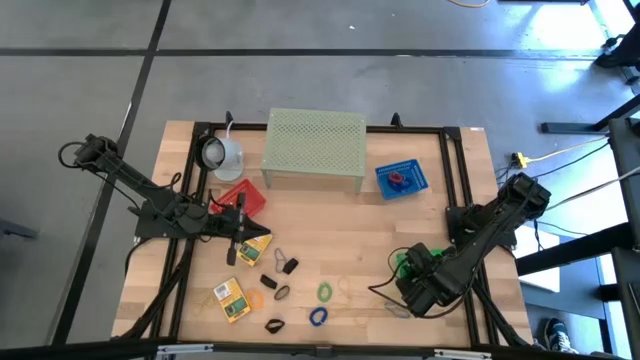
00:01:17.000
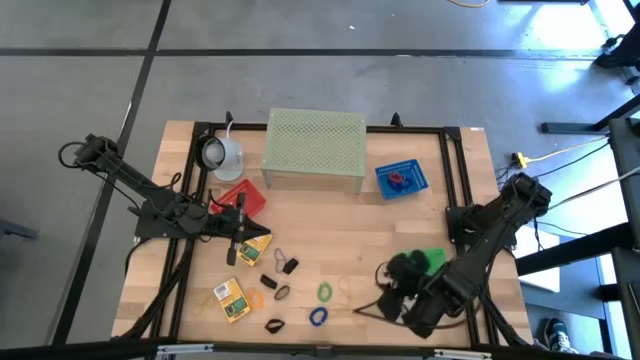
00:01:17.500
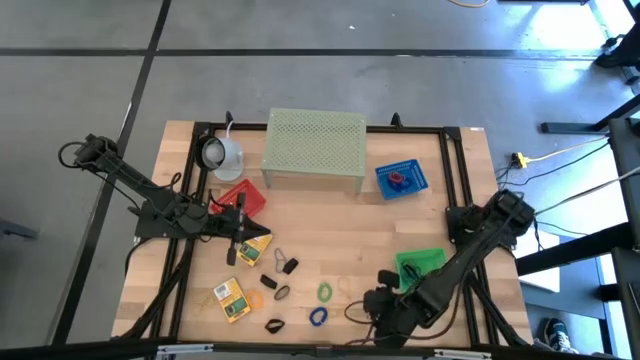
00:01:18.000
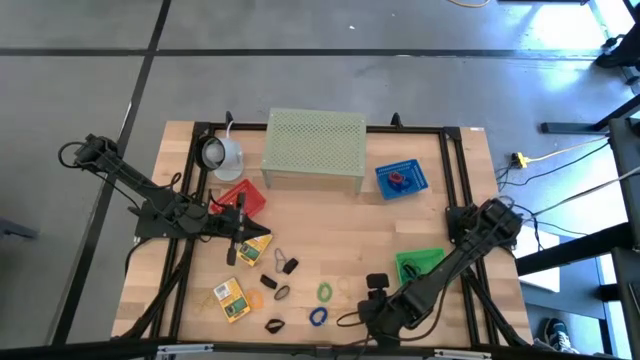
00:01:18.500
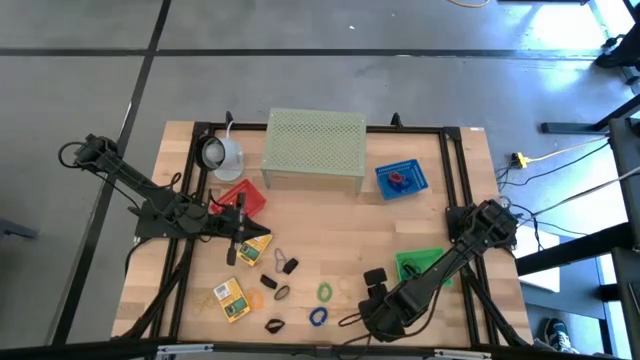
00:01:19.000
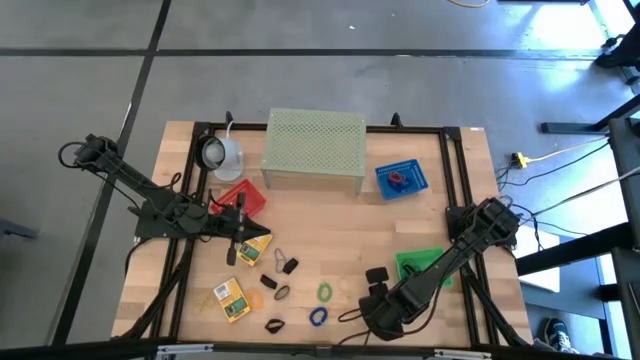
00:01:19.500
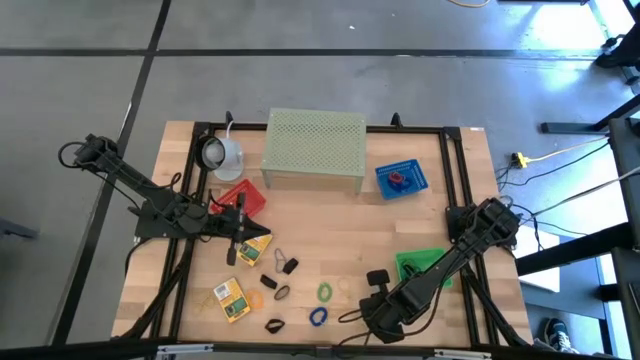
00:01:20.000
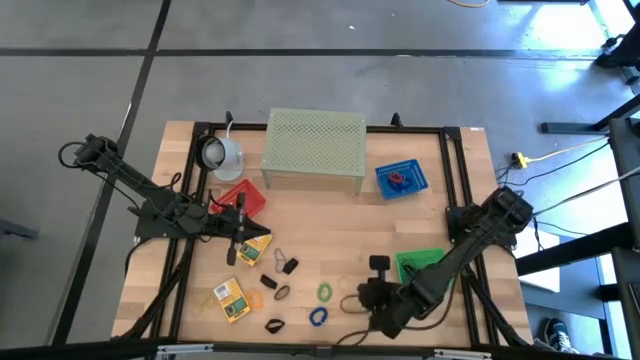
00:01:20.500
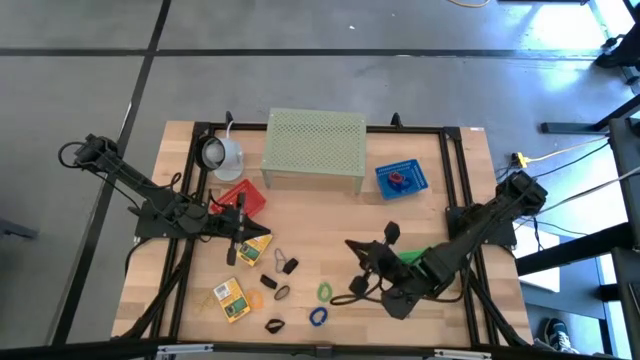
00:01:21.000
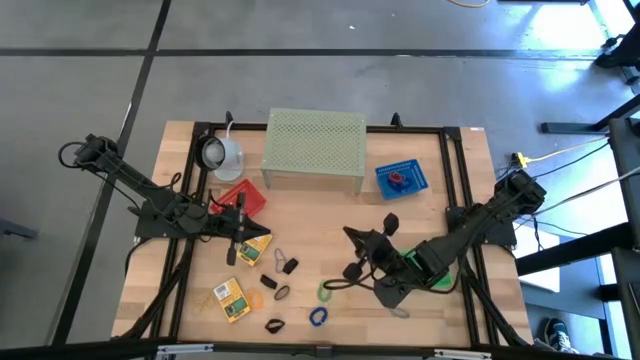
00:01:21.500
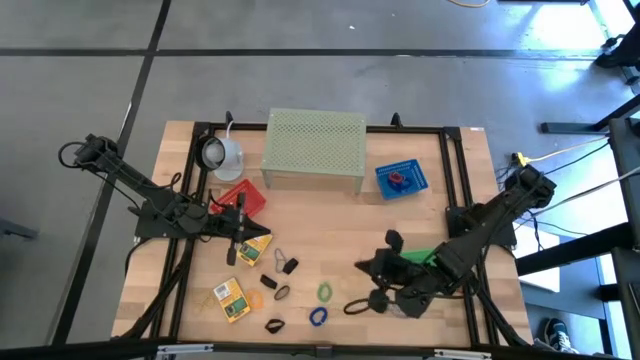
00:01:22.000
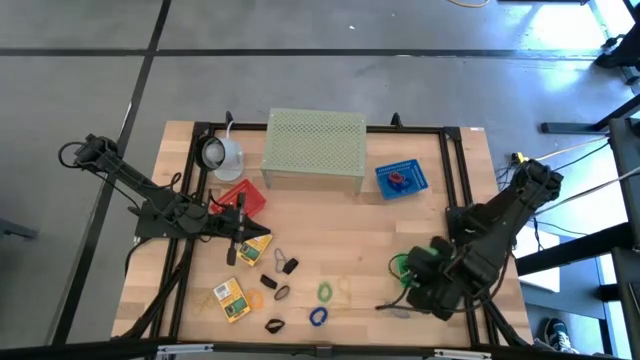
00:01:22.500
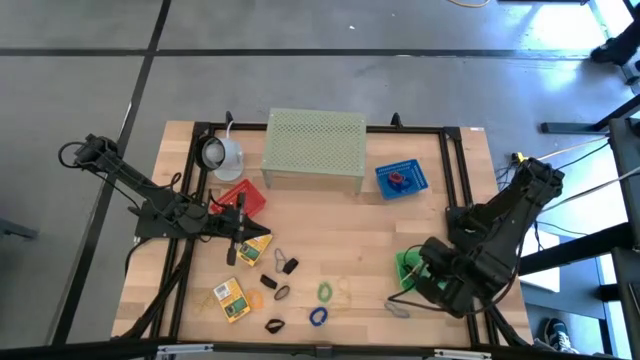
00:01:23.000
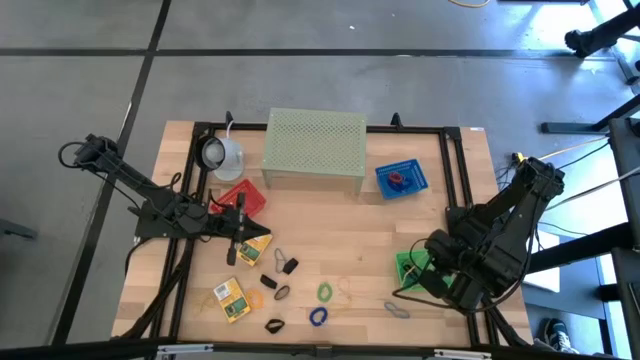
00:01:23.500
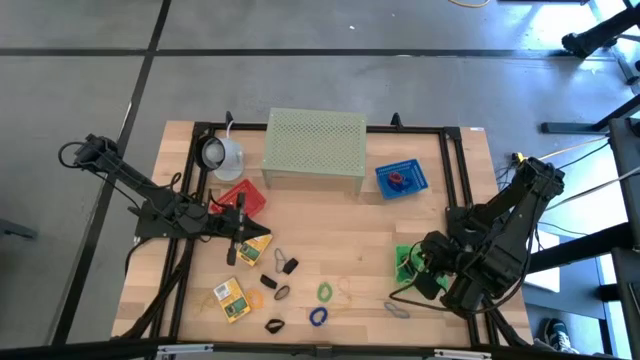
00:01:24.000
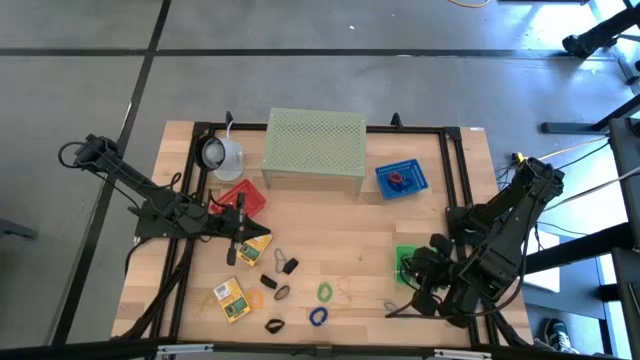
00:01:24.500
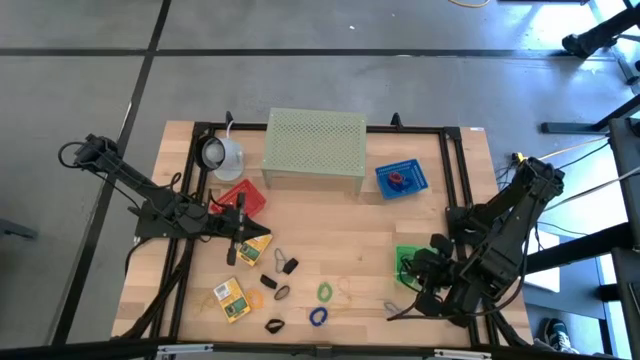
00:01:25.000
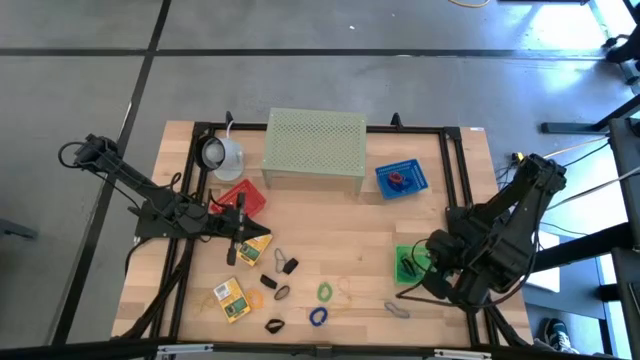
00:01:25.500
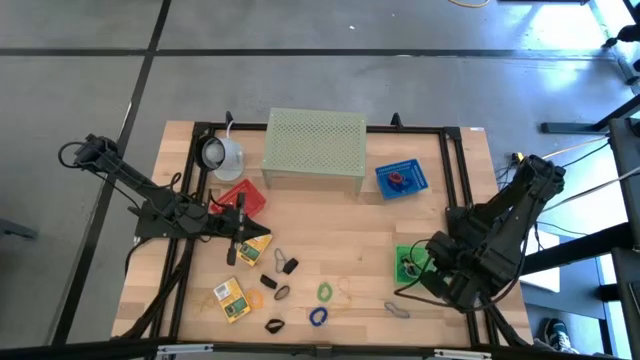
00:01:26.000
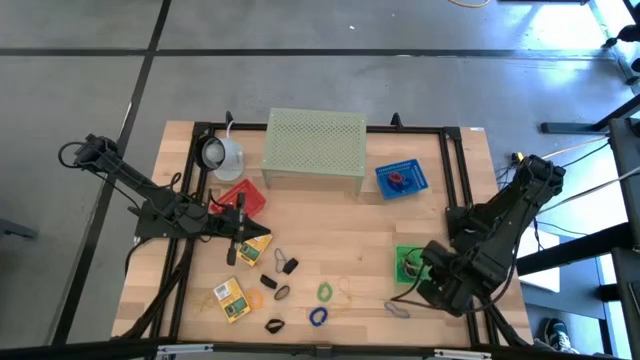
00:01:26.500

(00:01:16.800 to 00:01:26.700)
Task: Pick & Place Office Desk Supplies
Put the yellow rubber band into the green bin

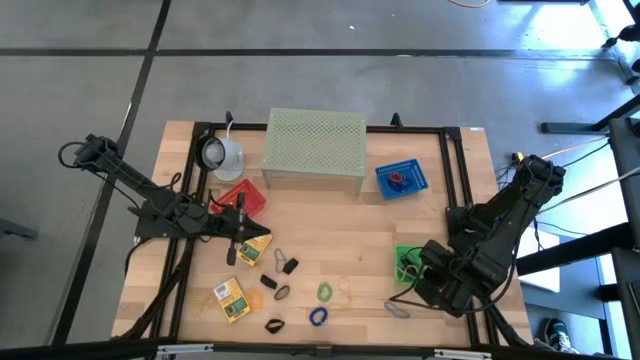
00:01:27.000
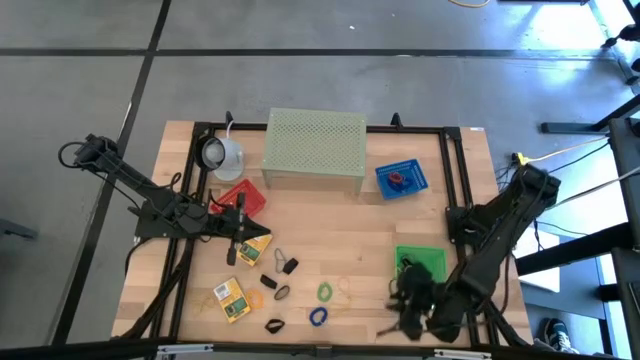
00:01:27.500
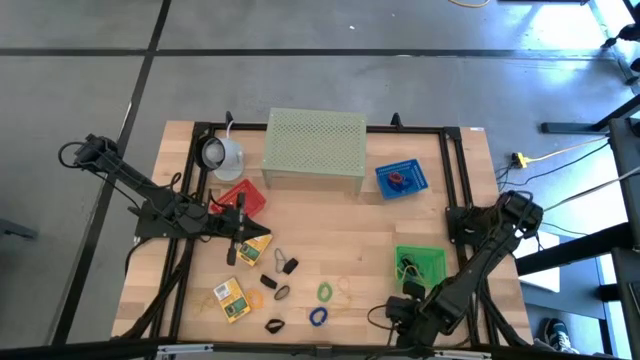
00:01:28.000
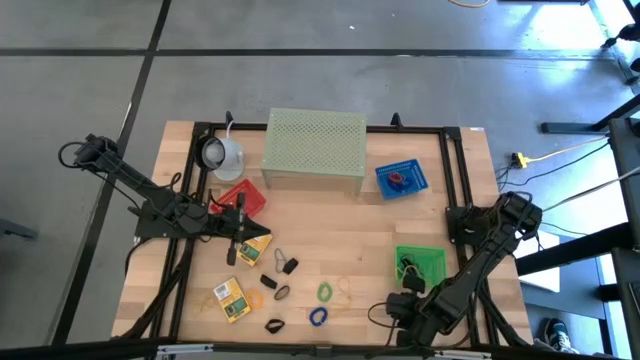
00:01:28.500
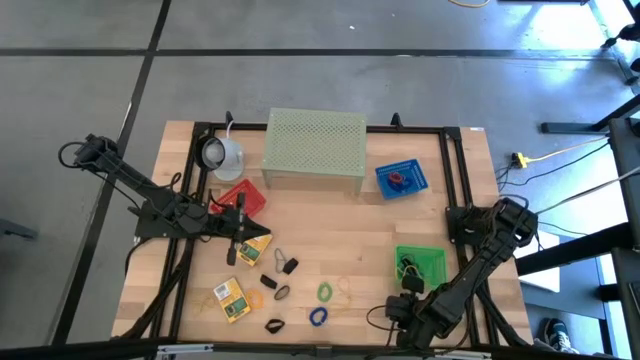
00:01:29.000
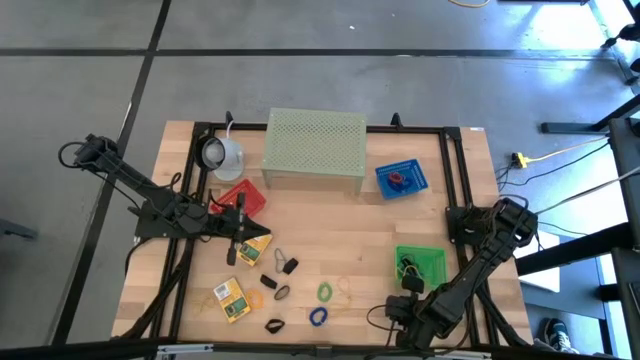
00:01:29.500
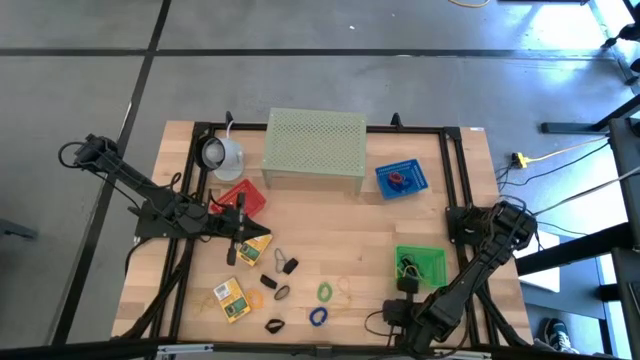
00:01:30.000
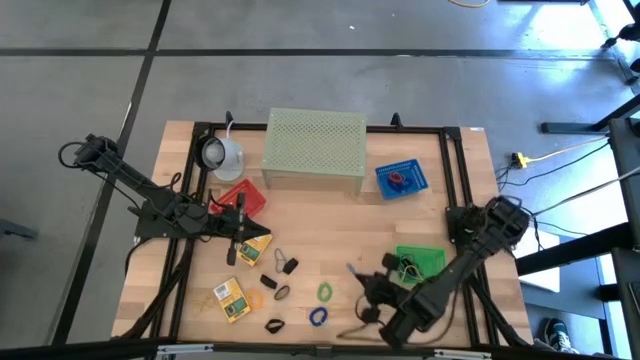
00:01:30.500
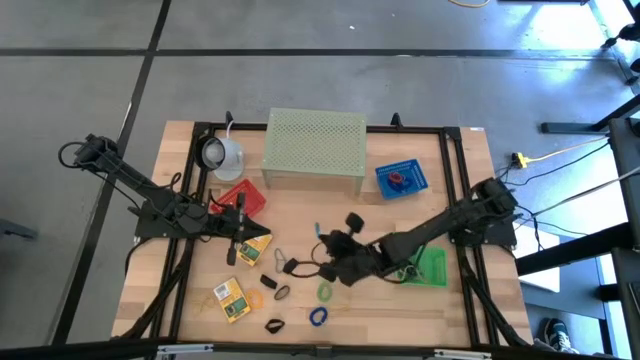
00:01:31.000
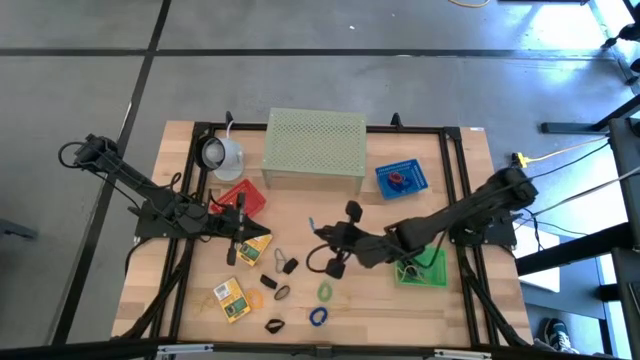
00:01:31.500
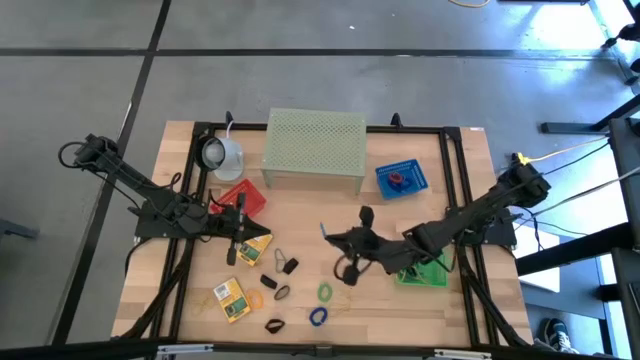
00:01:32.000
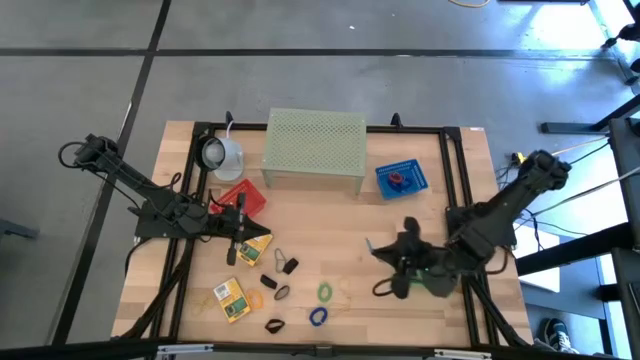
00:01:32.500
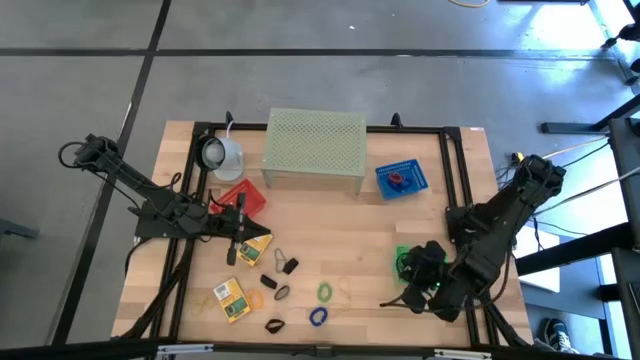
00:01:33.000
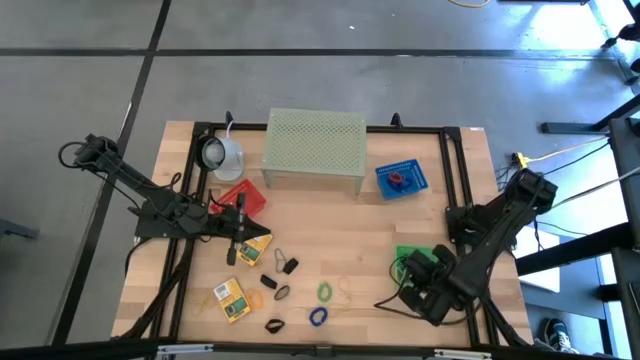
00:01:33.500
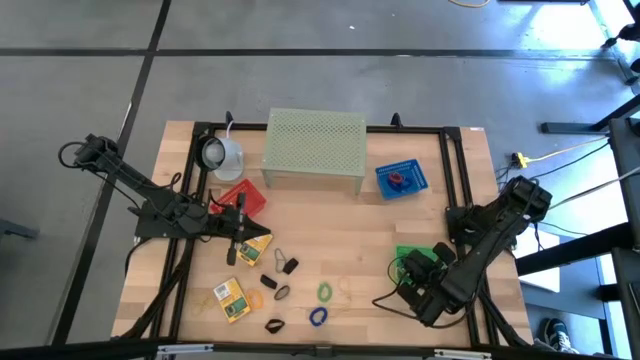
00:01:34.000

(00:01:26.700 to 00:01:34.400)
Put the blue rubber band into the green bin

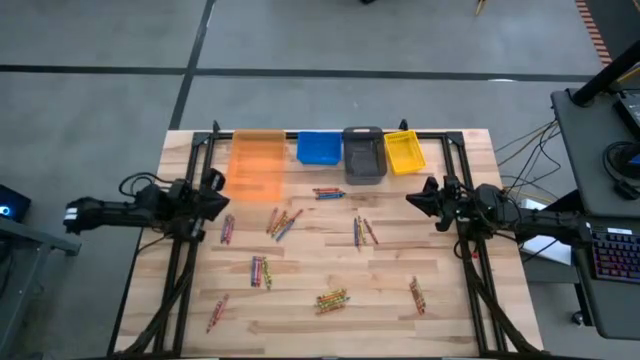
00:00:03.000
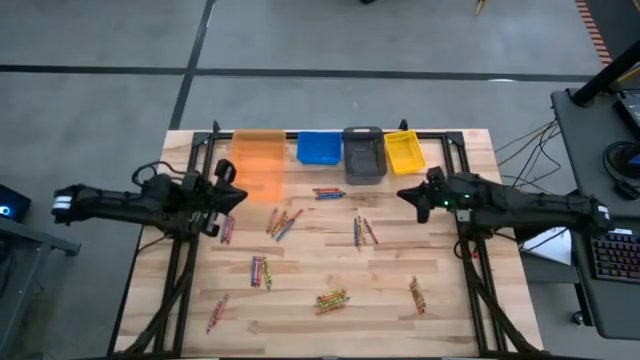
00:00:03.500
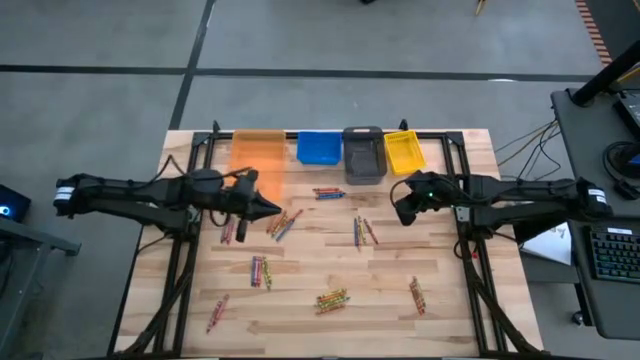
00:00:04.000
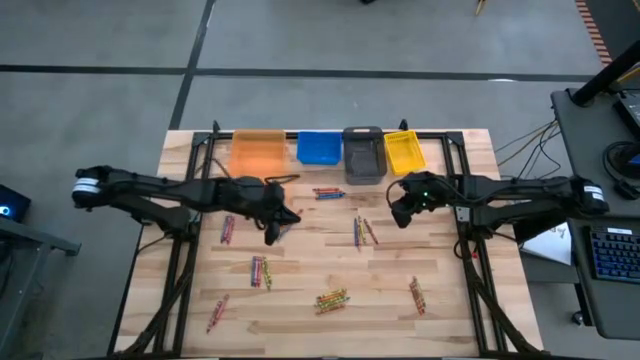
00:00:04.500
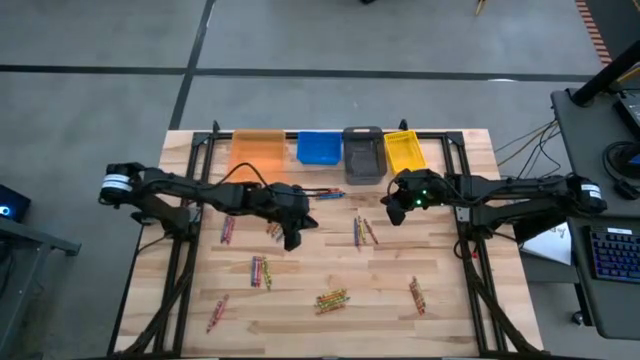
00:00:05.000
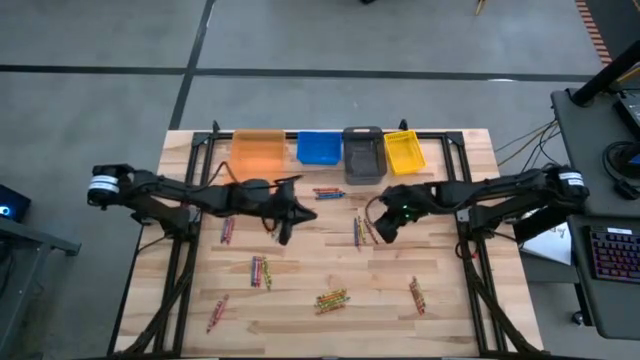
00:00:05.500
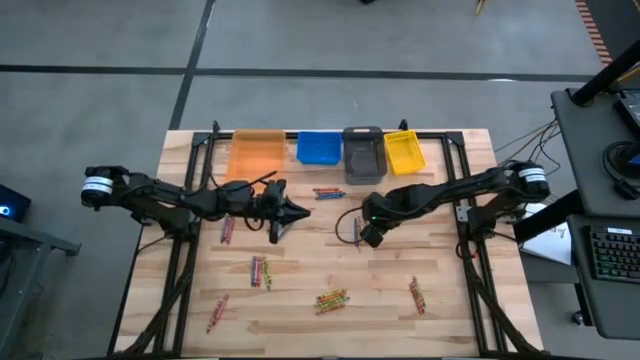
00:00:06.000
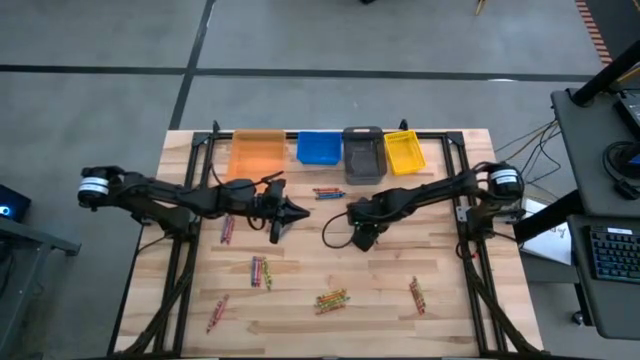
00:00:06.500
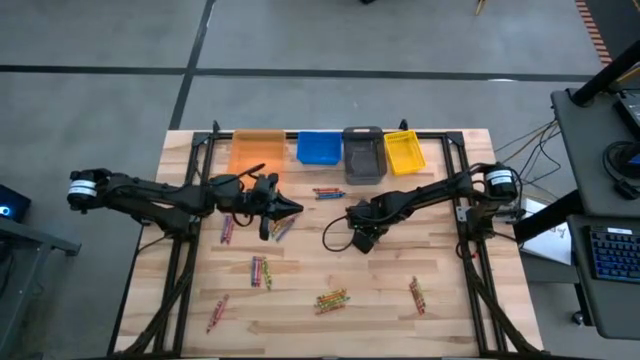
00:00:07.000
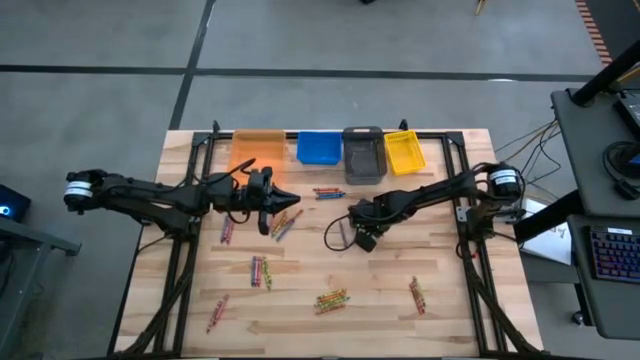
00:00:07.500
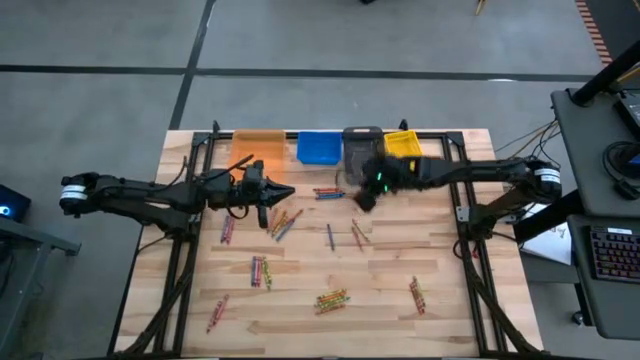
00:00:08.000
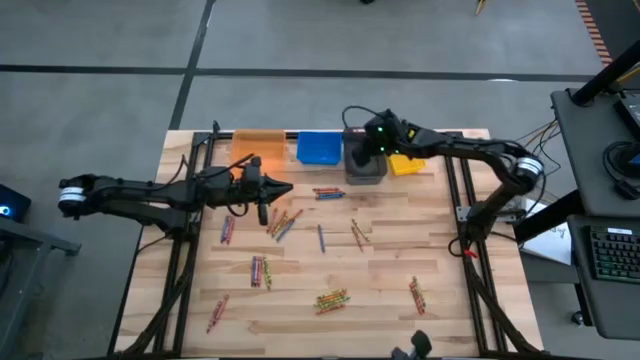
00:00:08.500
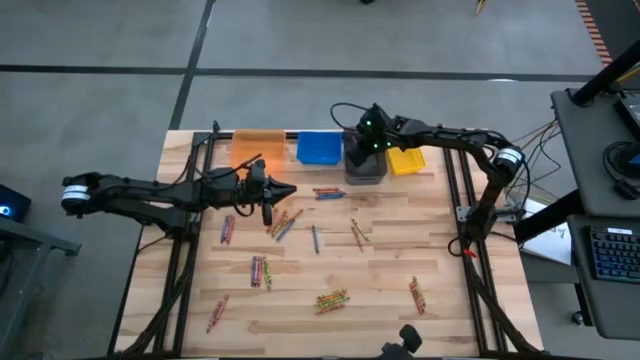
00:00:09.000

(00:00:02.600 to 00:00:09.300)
Task: Sort crayons
Put the red crayon into the black bin
